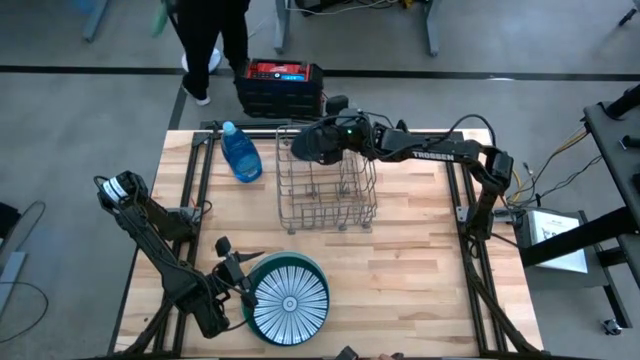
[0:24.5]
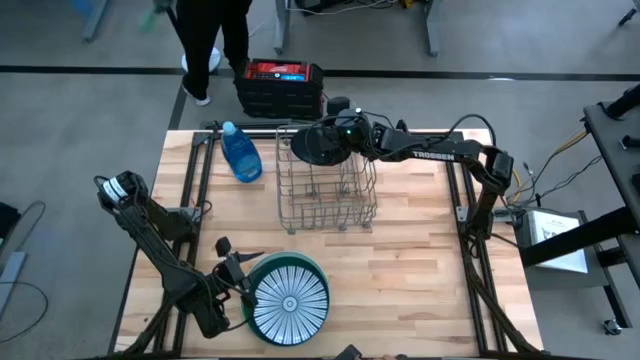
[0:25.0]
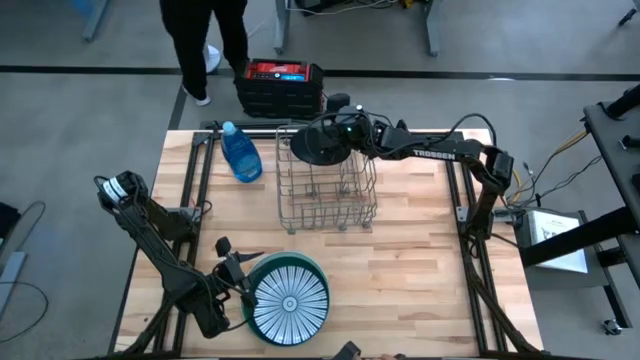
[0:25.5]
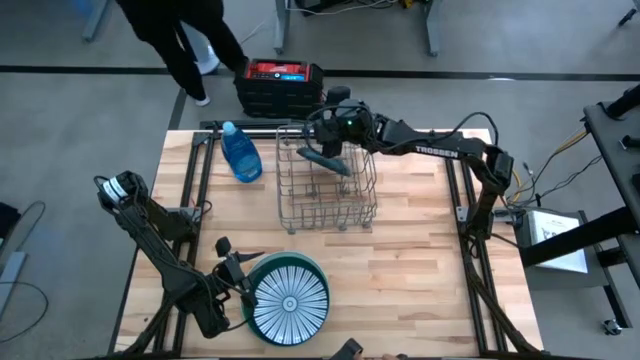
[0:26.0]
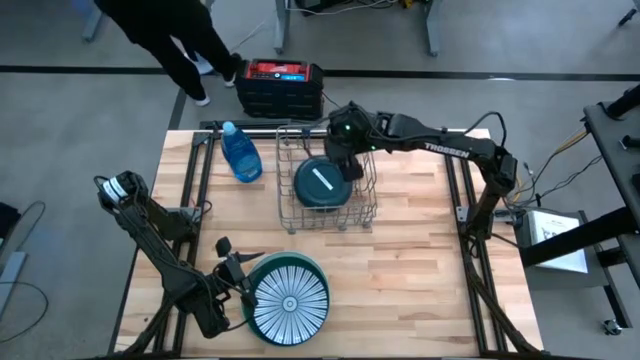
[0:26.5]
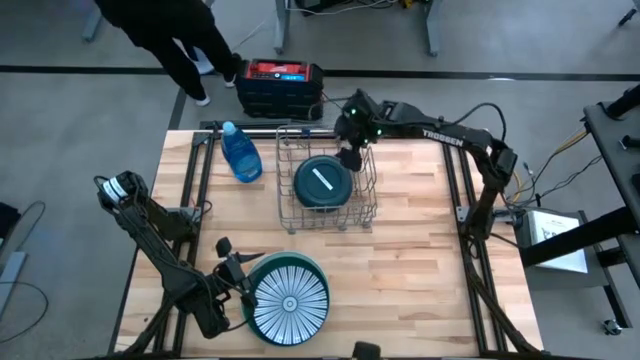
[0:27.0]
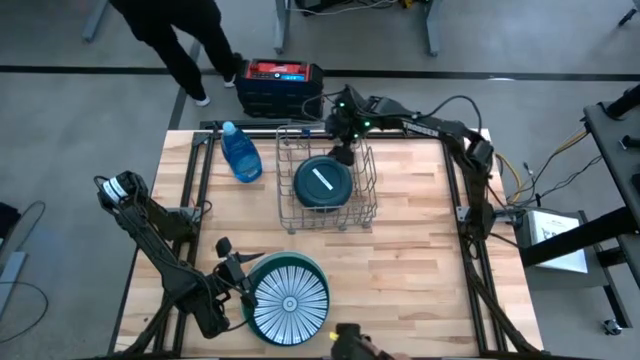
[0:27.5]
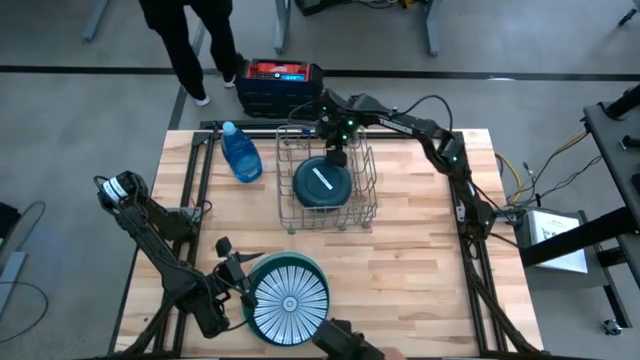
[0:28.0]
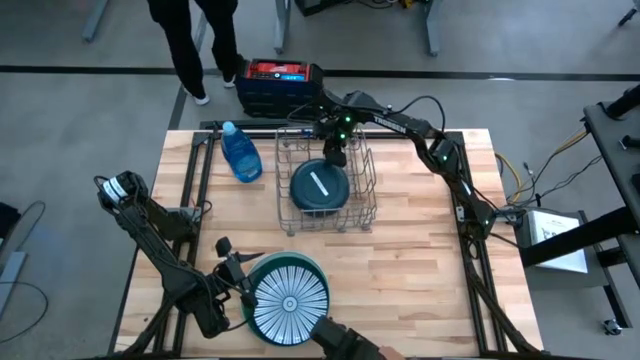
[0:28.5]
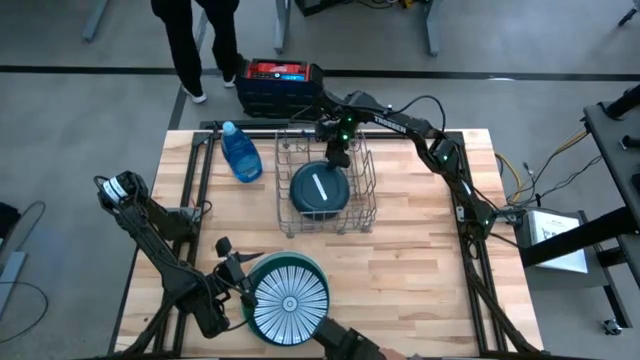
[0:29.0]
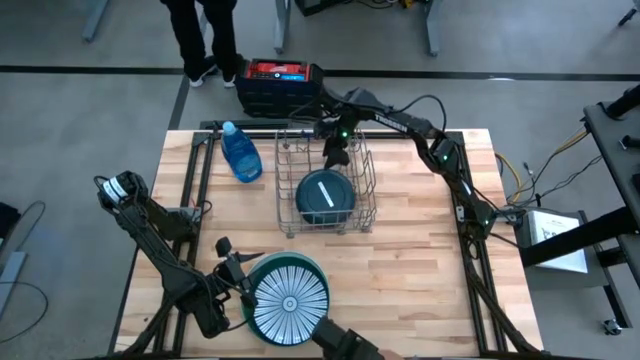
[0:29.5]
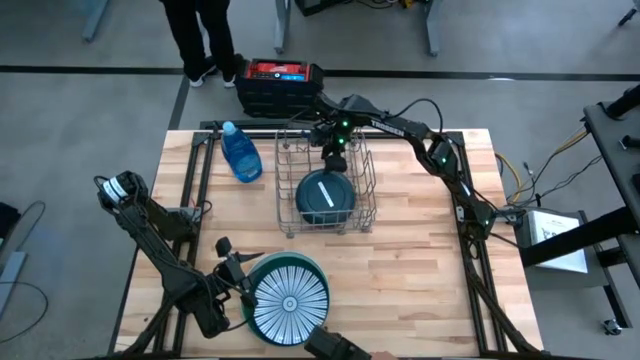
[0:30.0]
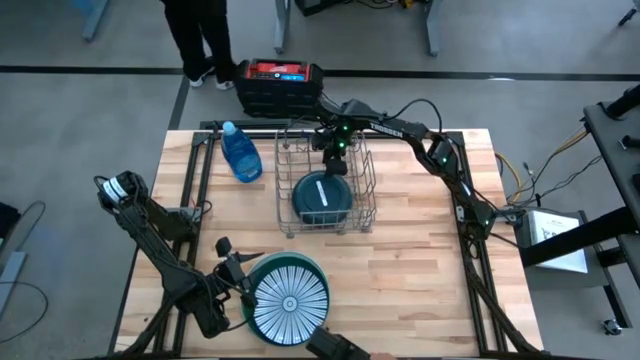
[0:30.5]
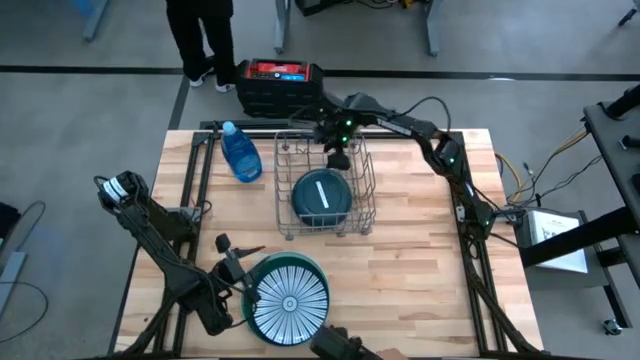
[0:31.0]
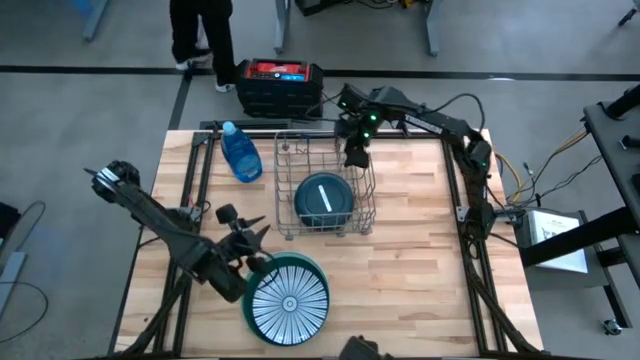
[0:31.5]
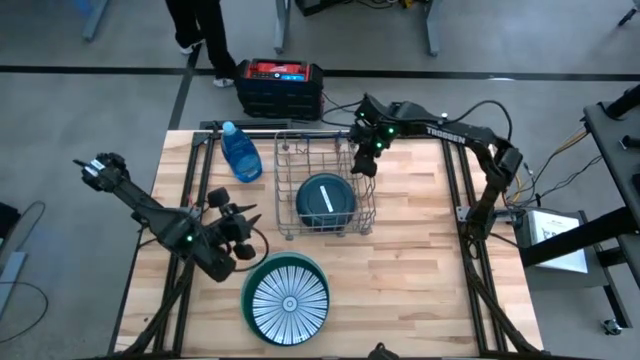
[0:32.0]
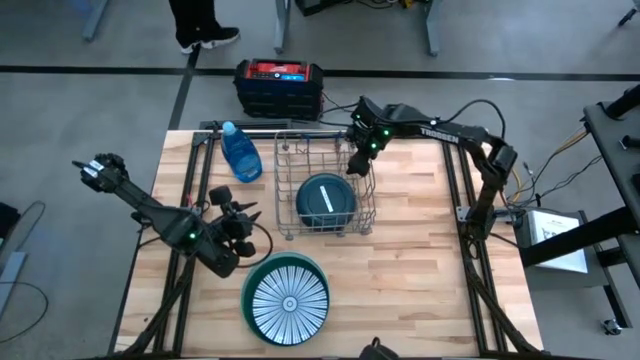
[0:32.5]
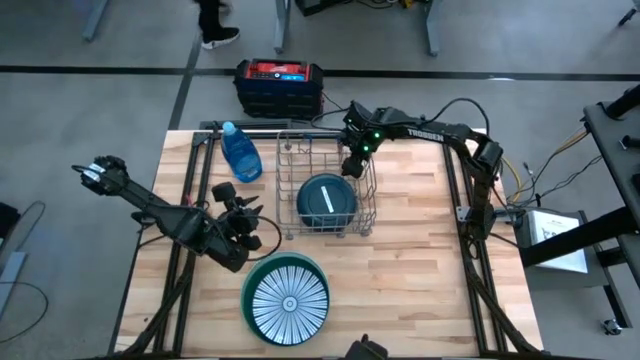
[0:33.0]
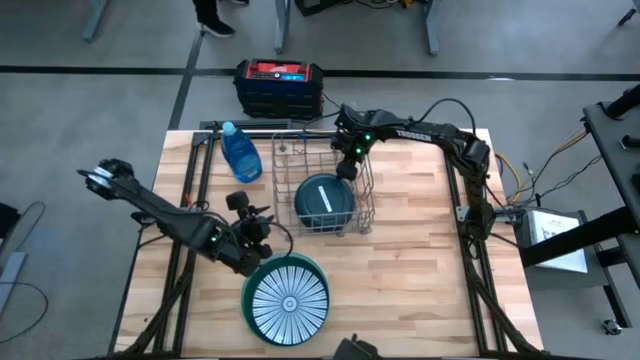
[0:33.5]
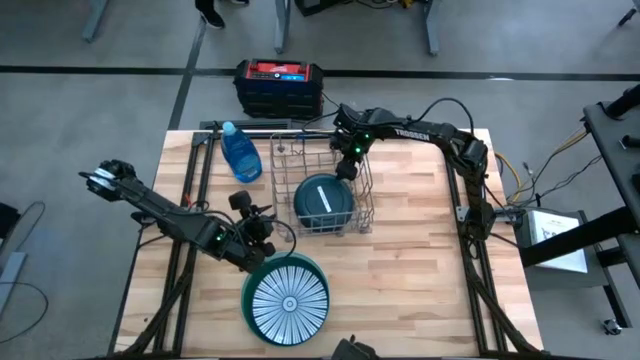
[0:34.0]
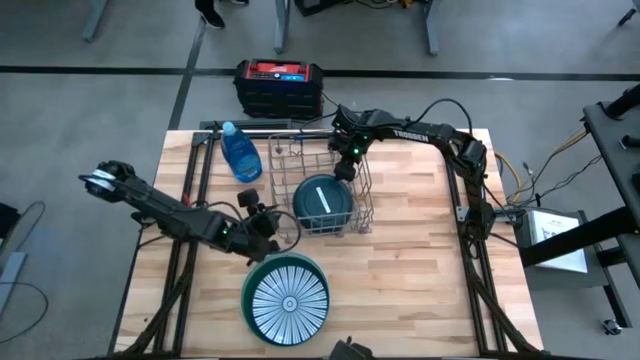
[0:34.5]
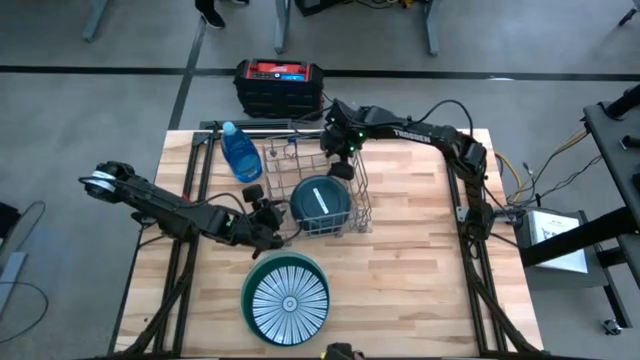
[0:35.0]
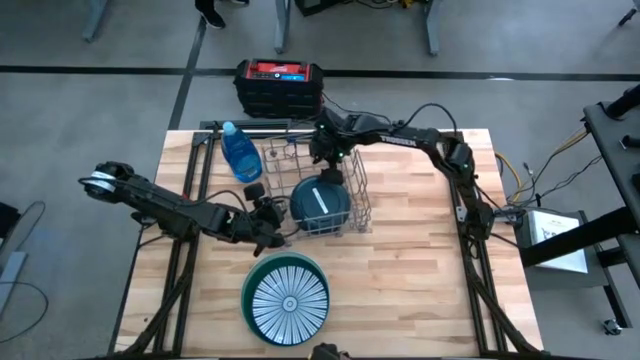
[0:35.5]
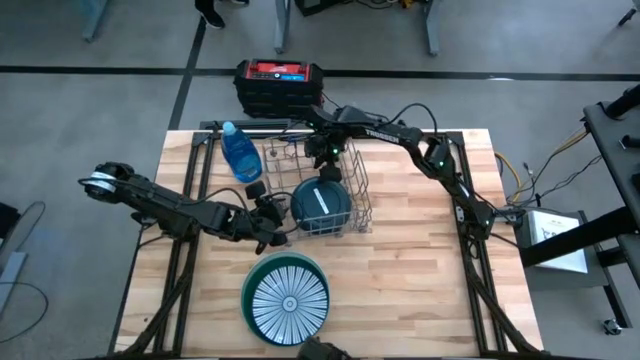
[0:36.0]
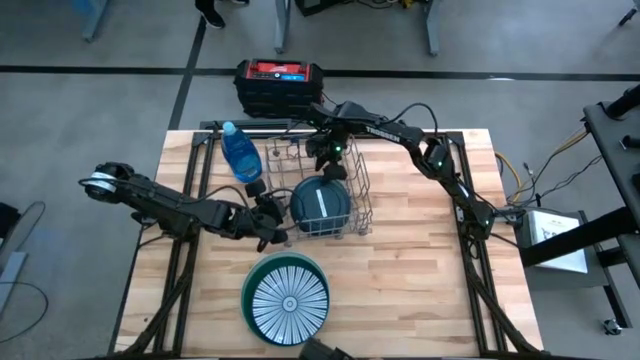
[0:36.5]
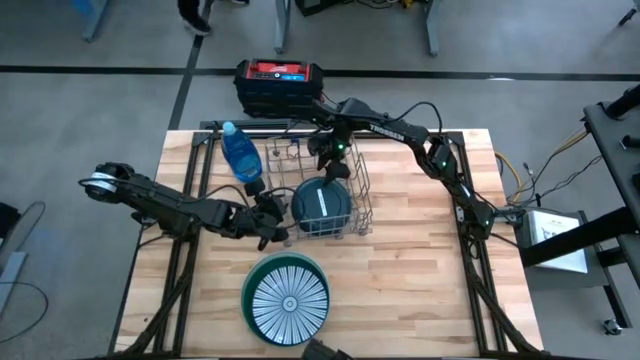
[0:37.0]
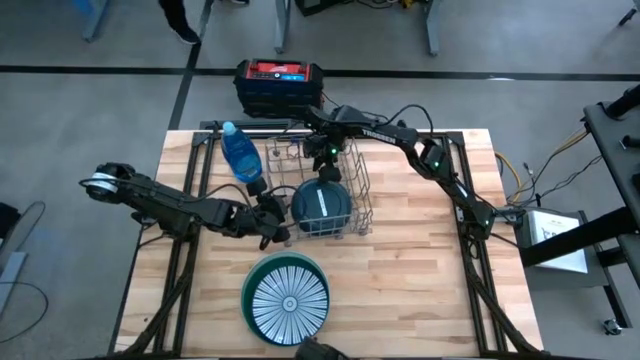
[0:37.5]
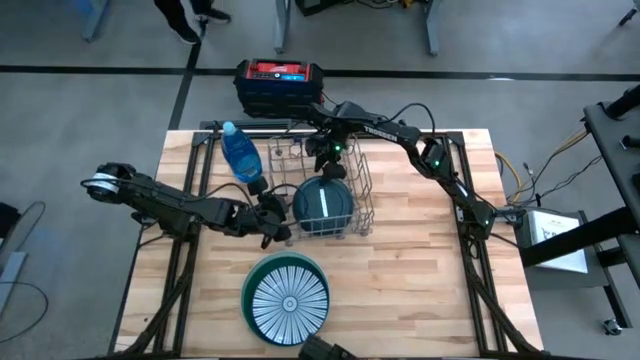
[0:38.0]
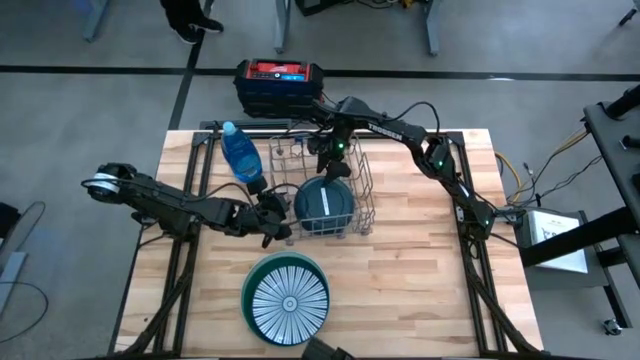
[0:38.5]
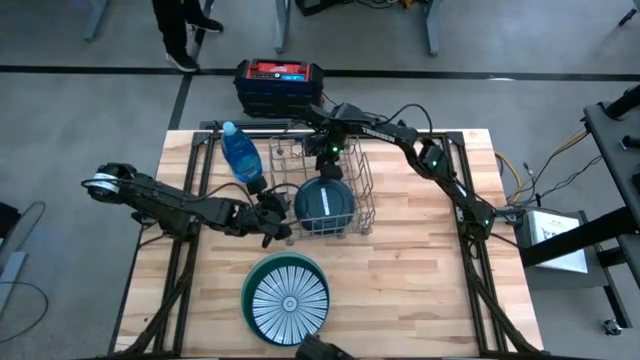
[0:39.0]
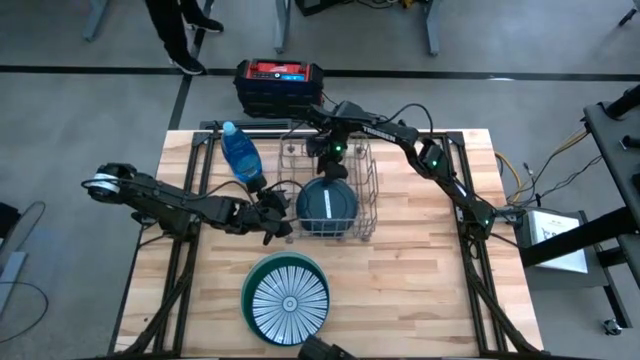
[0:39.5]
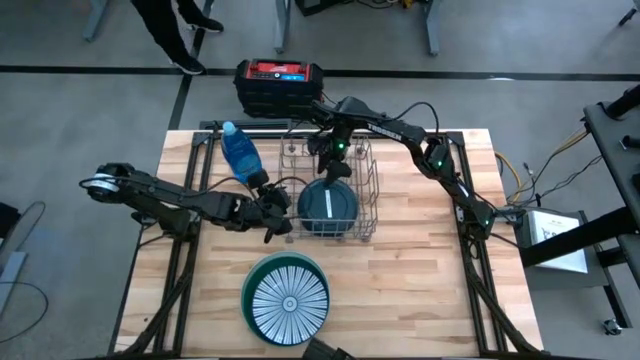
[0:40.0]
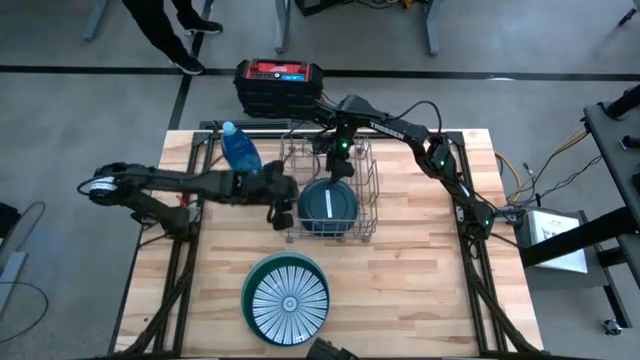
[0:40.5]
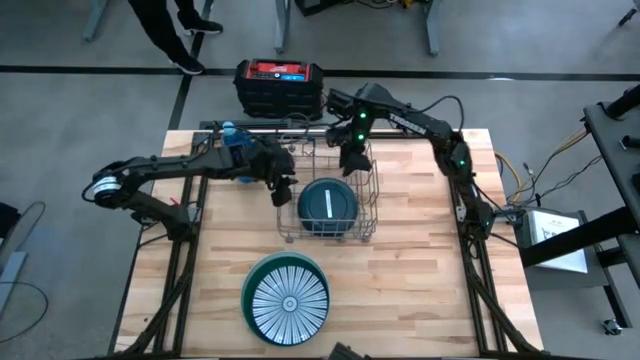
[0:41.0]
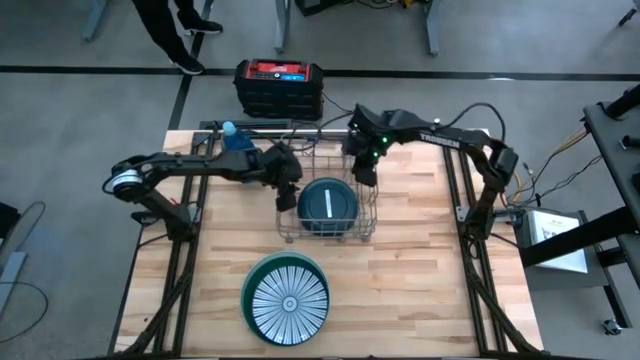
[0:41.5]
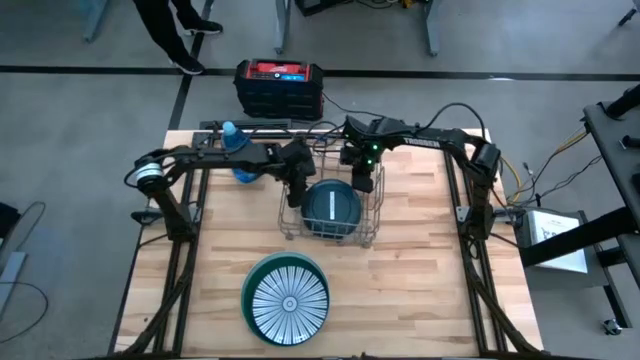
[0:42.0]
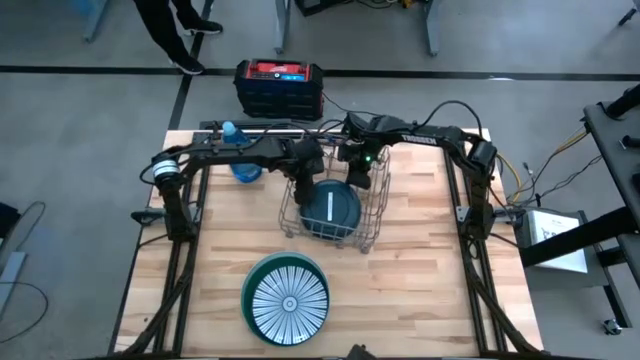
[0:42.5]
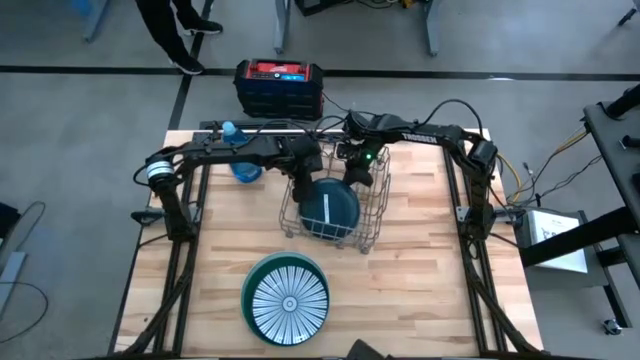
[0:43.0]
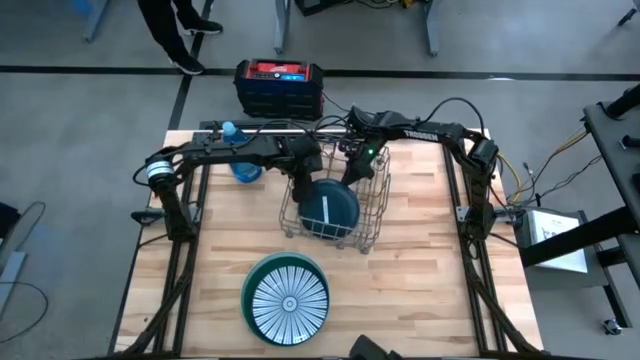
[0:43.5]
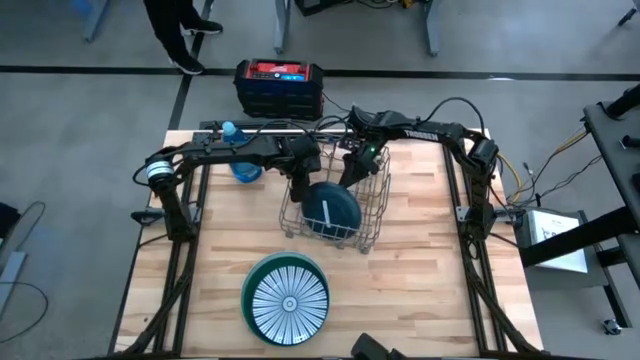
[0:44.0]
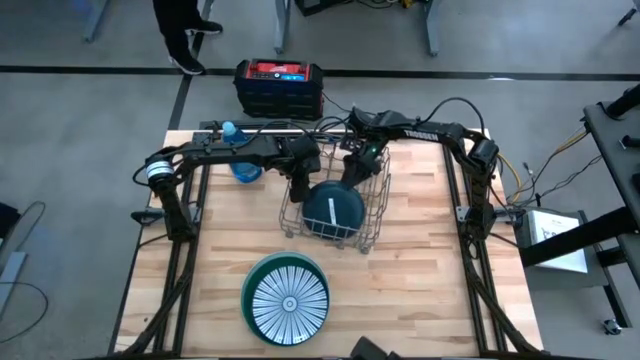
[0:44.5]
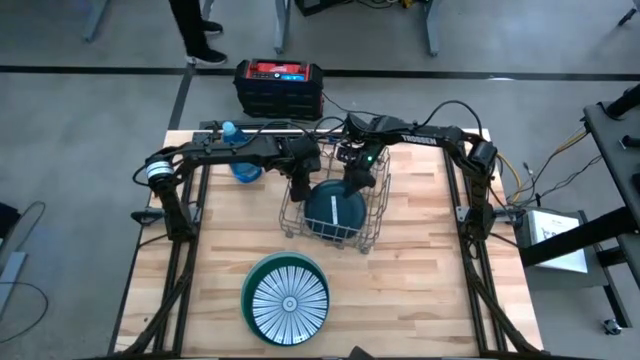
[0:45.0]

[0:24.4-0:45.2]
Task: Sort dishes
Put the blue plate into the gray dishwasher rack
